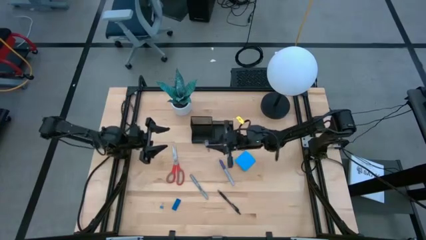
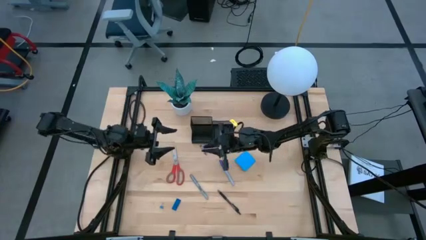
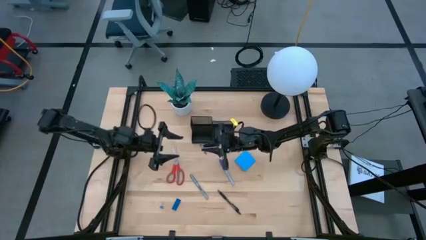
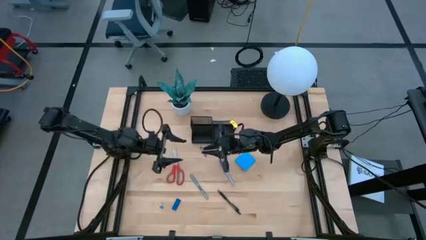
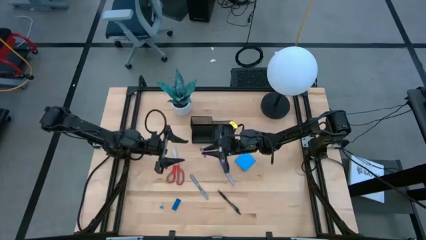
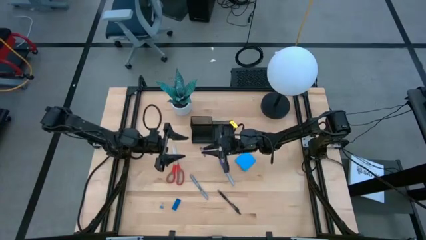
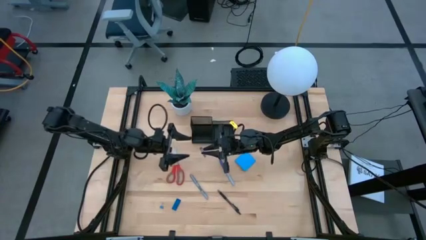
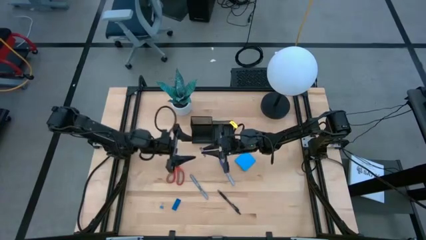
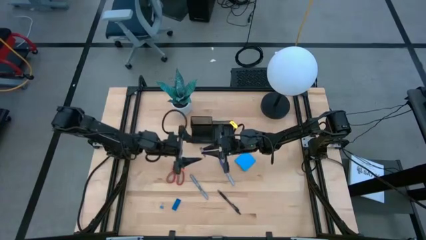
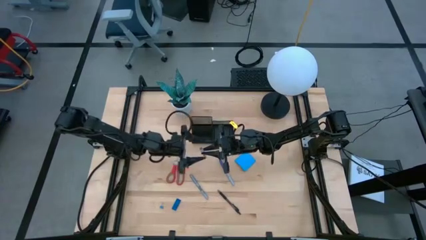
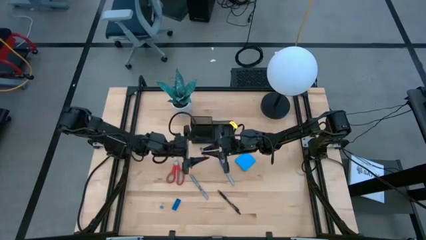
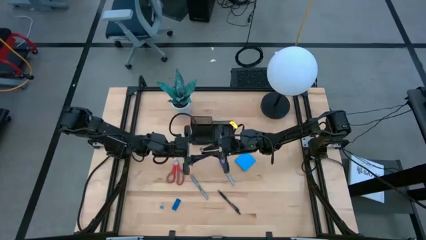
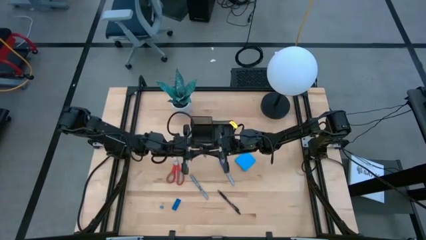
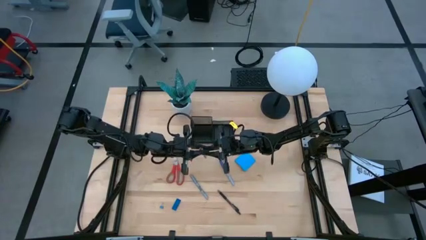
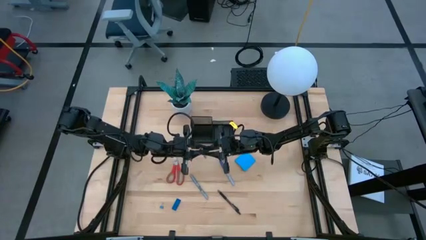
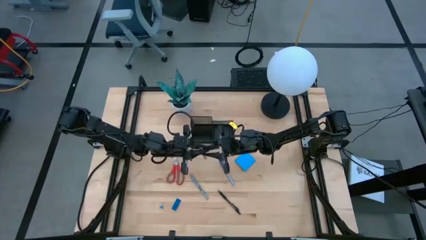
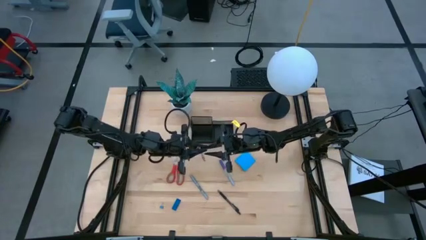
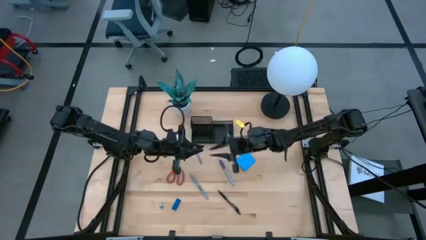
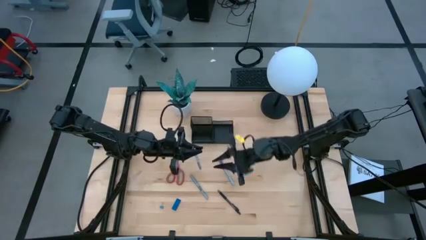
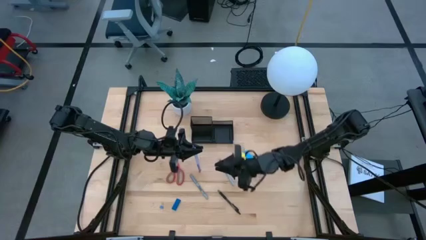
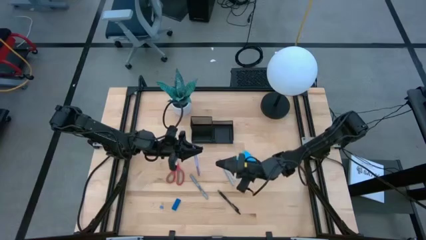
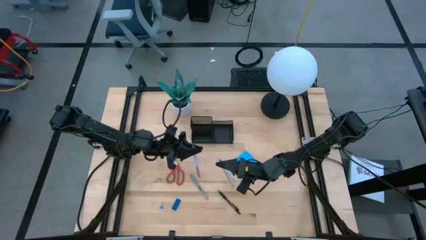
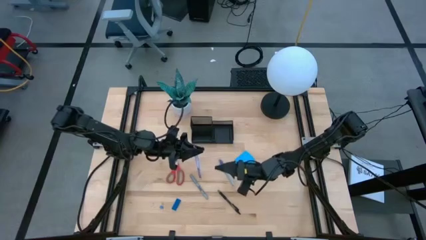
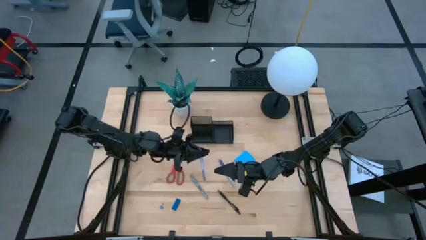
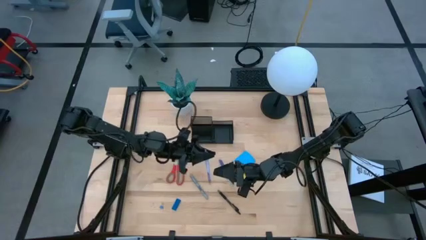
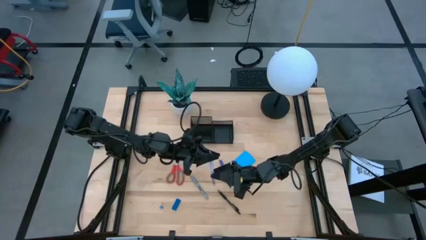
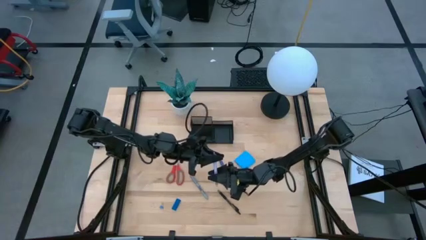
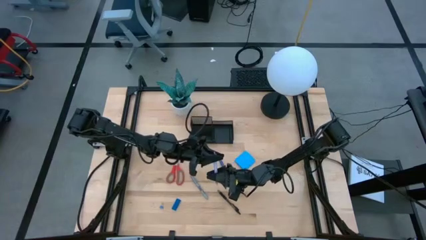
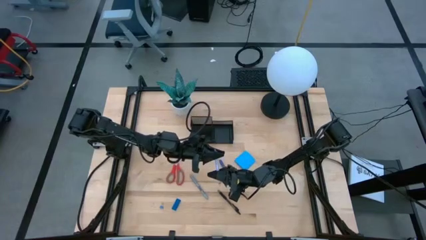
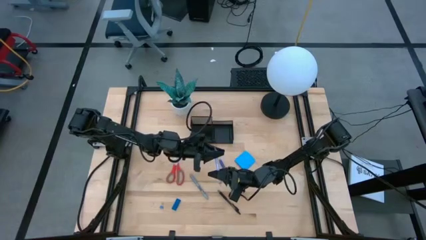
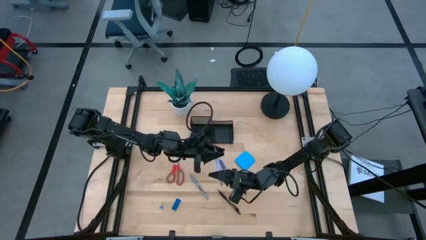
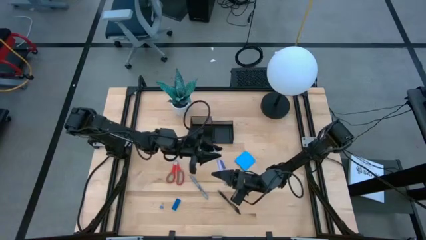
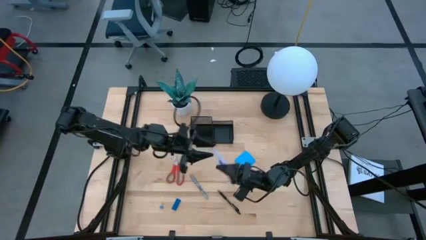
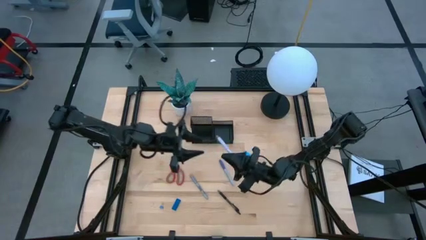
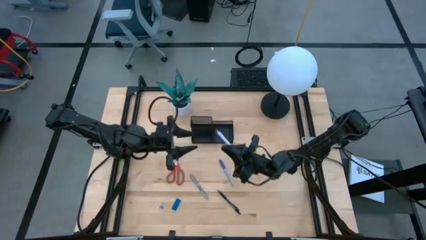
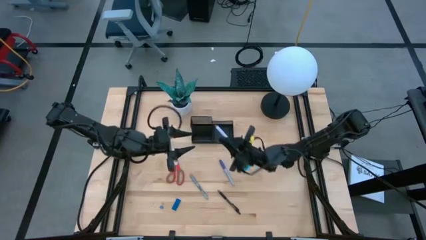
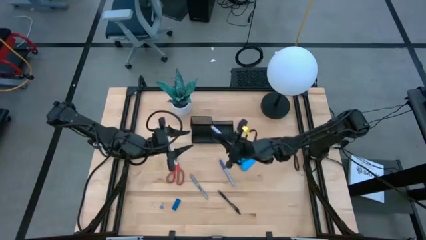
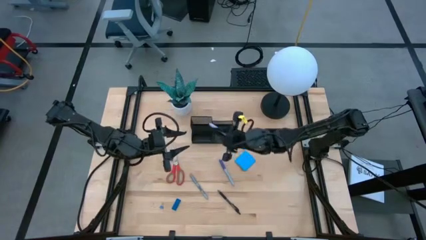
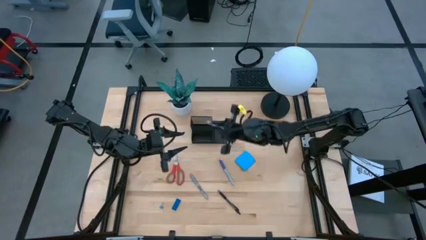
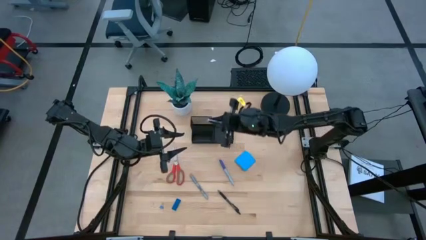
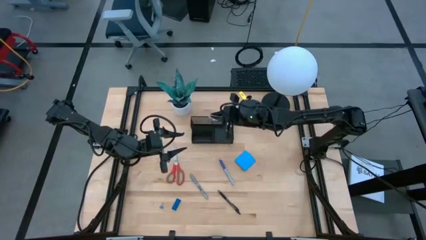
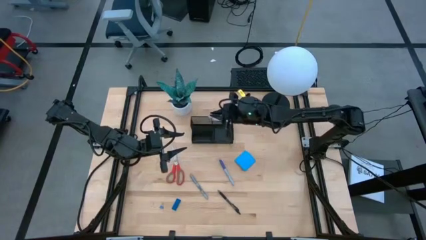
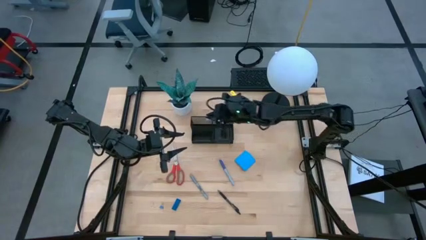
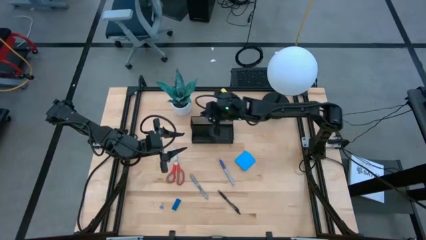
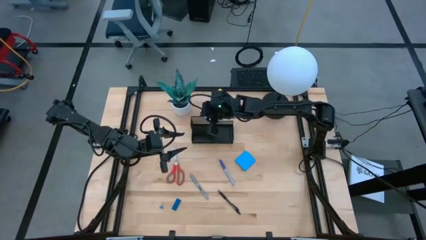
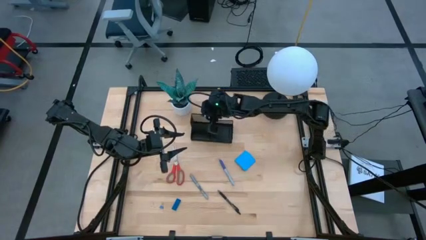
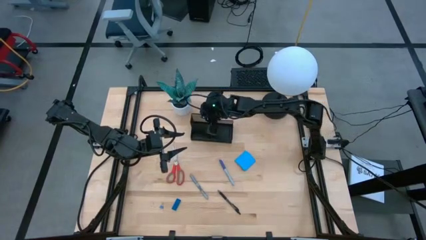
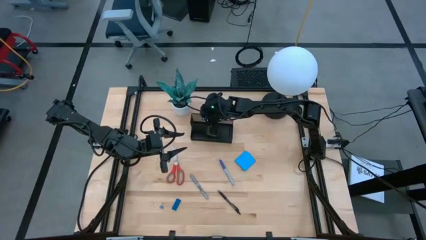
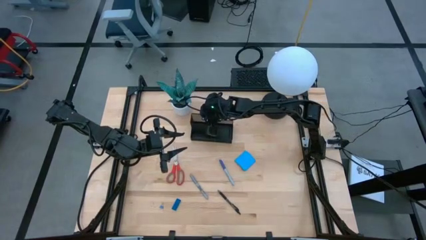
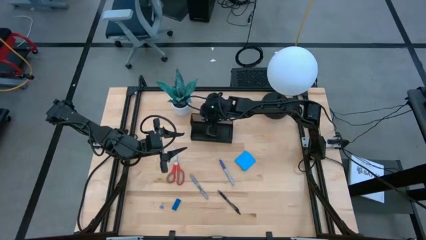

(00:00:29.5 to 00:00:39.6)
Task: Pick and place office supplies into organizer
Put the purple pen into the black desk organizer

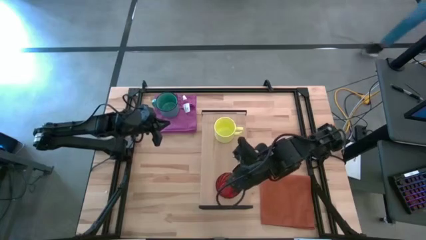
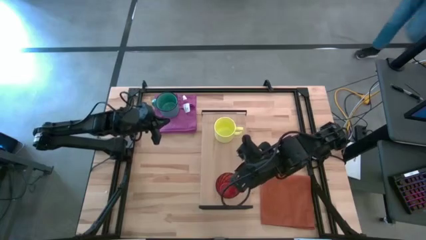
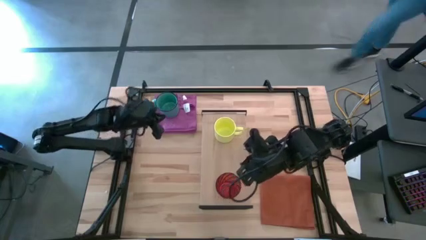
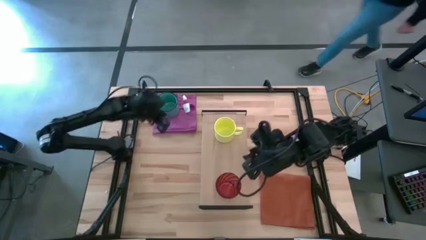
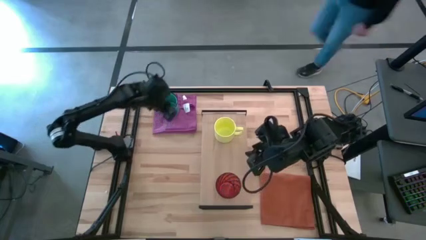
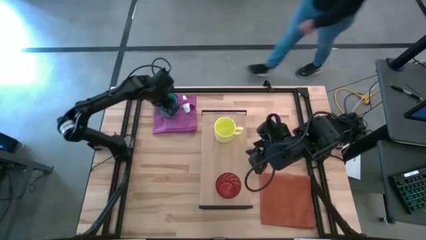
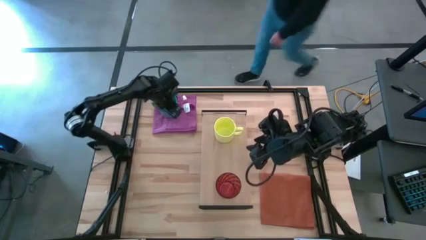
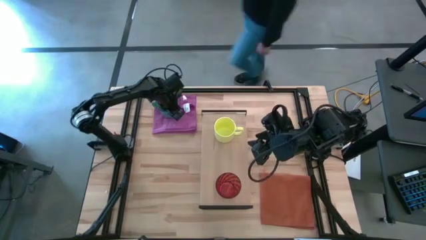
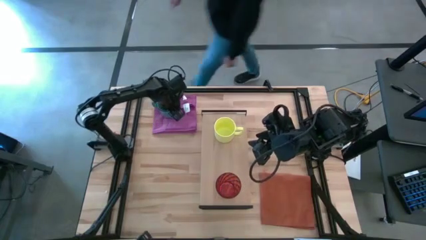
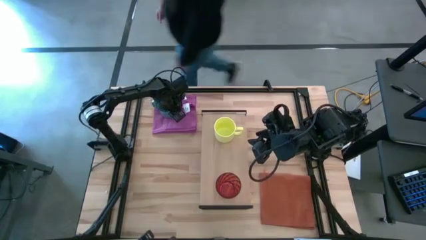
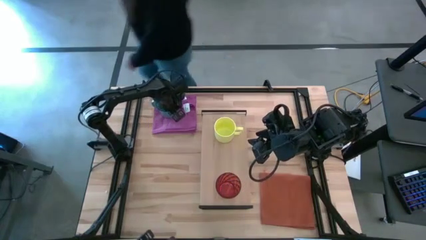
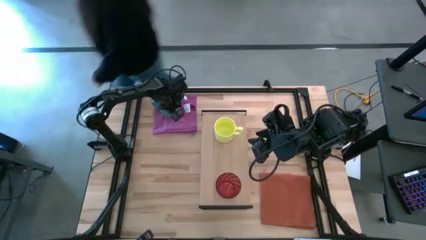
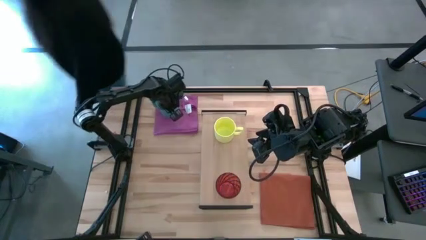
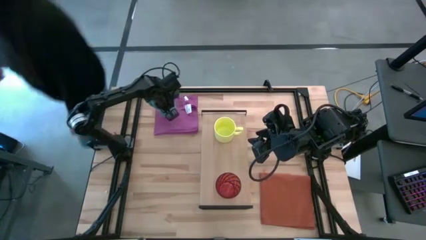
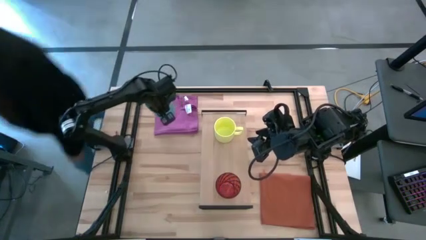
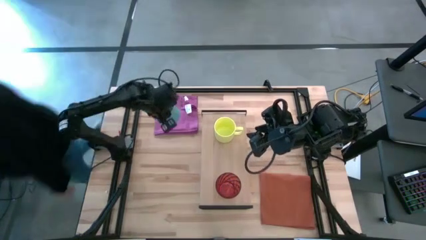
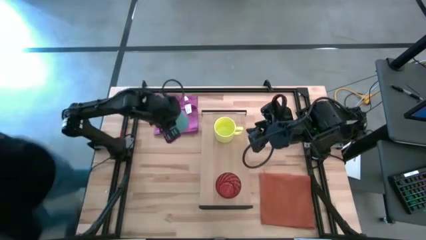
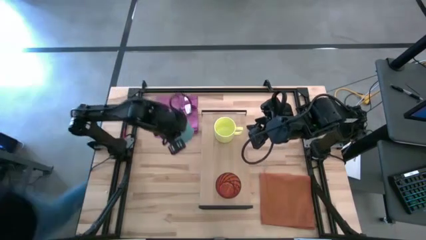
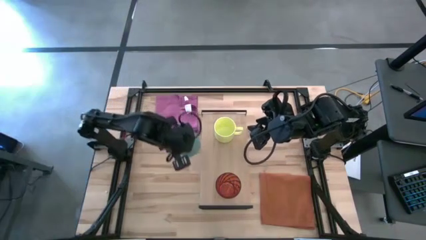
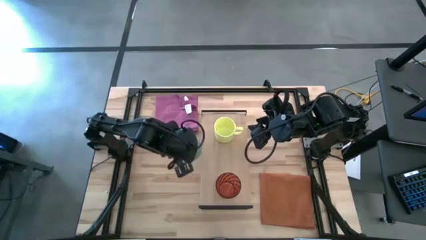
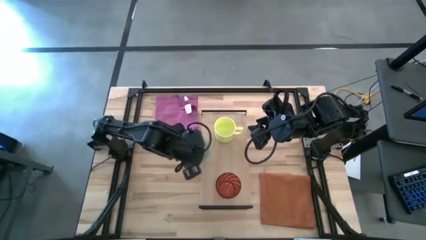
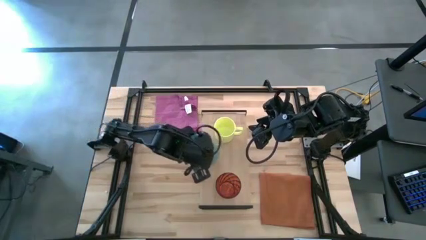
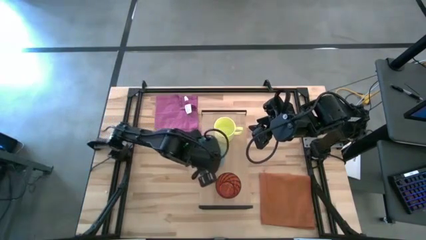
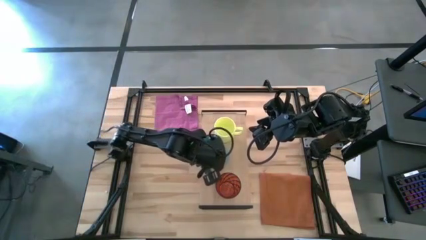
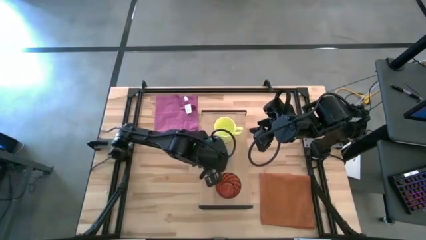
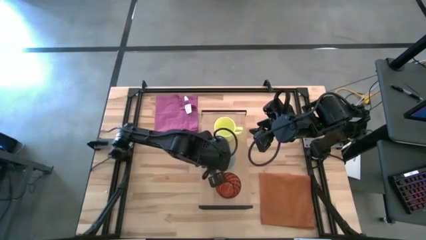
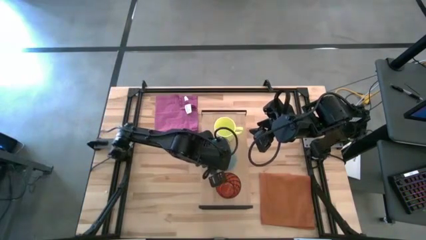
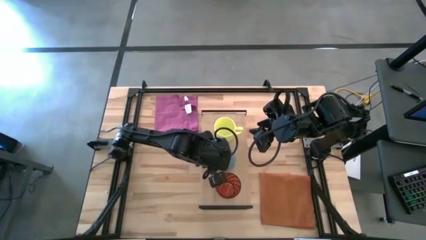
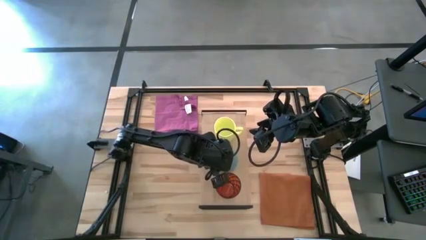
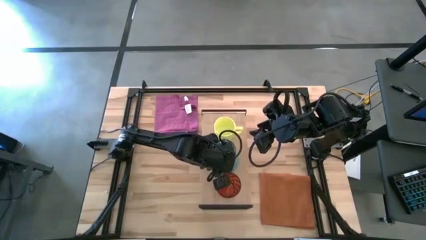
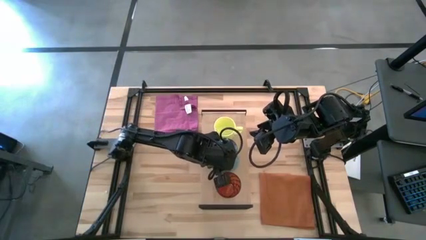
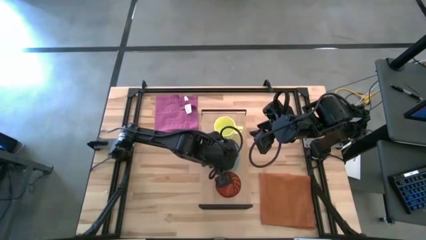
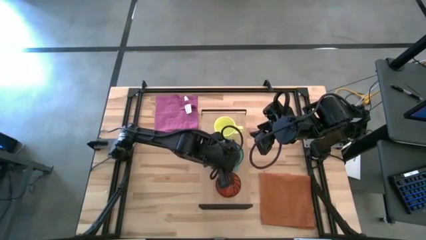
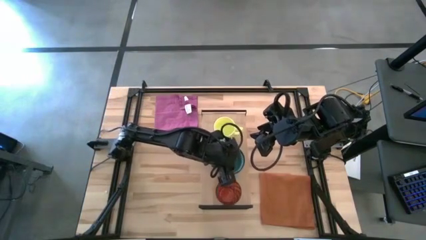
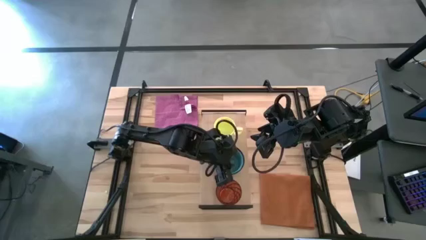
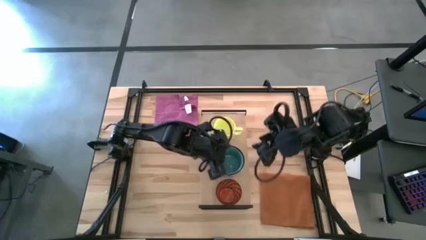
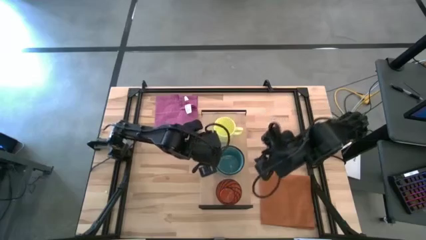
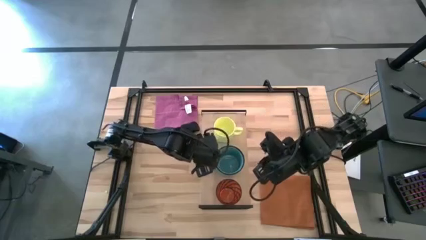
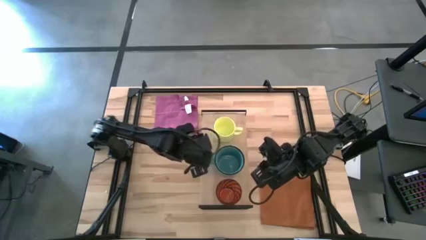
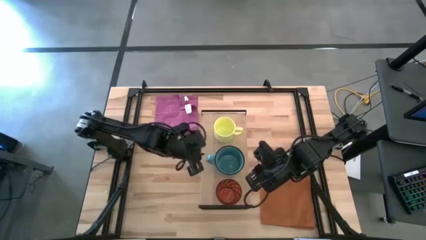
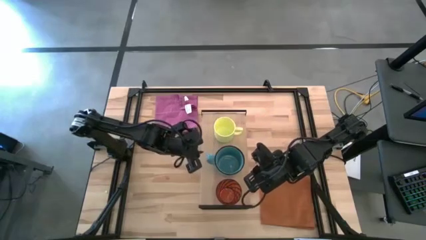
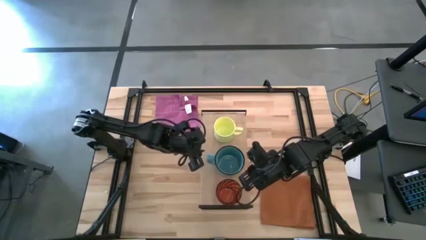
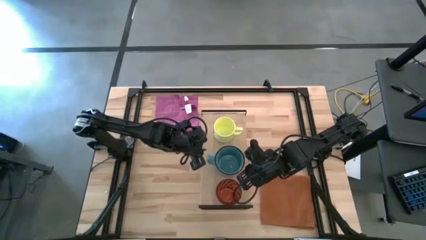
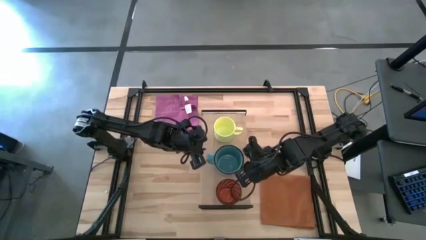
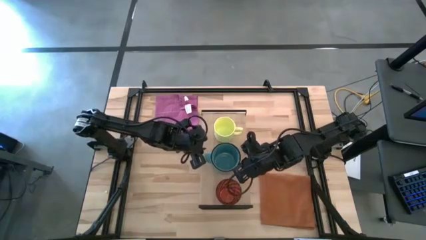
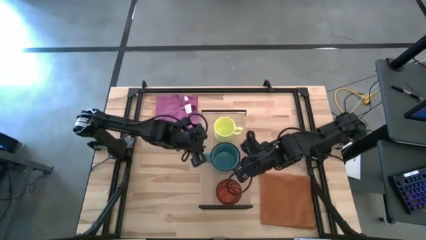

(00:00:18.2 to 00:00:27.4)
Task: Stack small to large cups/mugs on shelf
Put the blue mug on the shelf
